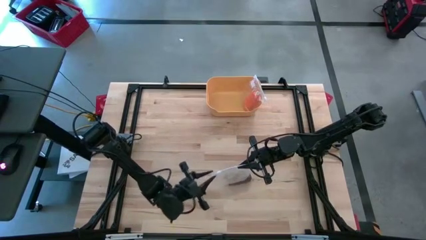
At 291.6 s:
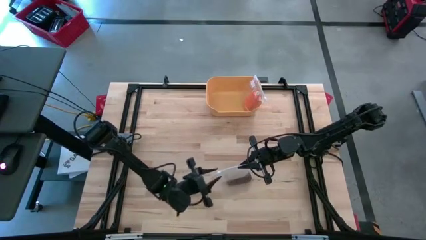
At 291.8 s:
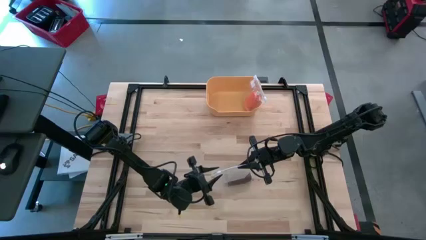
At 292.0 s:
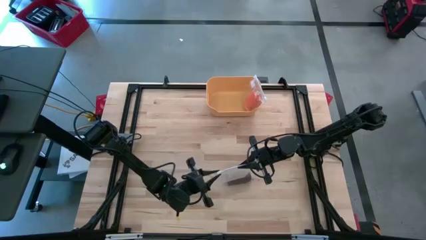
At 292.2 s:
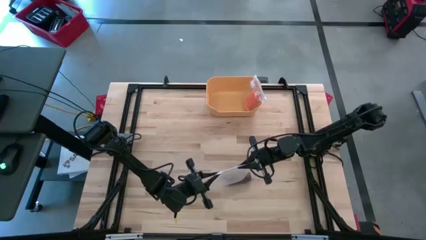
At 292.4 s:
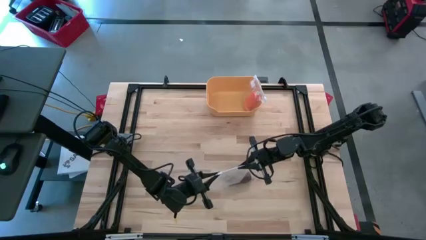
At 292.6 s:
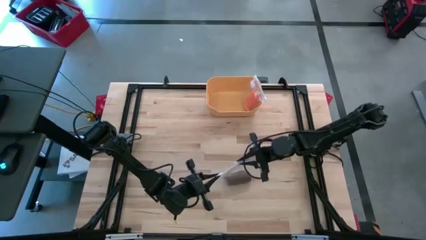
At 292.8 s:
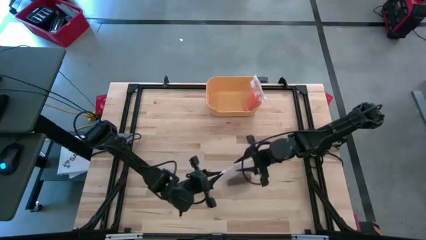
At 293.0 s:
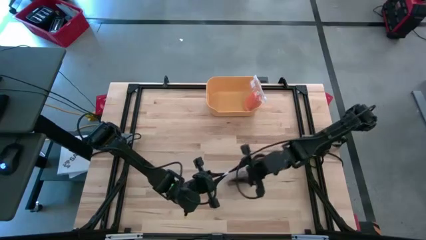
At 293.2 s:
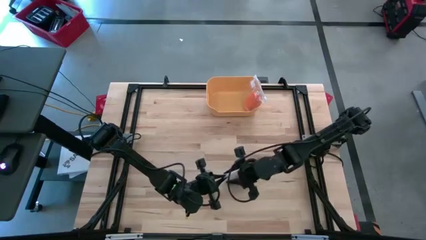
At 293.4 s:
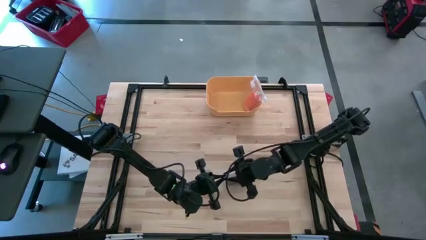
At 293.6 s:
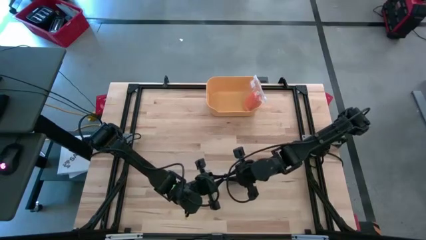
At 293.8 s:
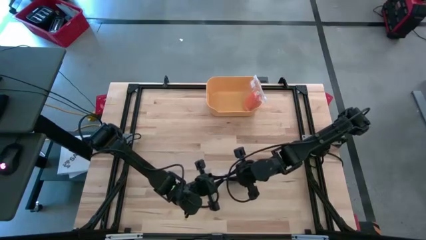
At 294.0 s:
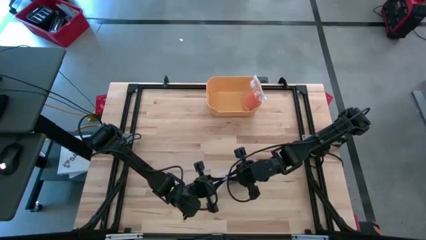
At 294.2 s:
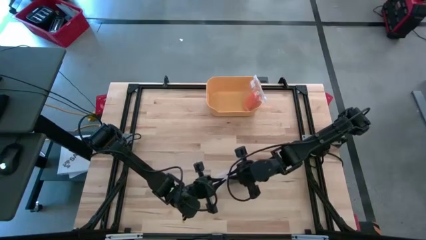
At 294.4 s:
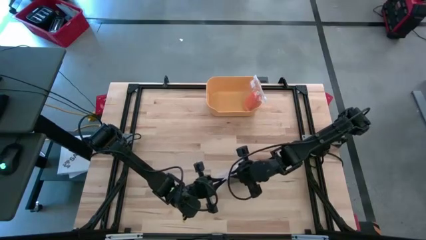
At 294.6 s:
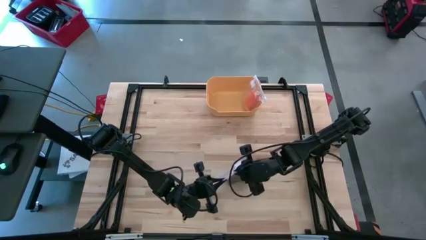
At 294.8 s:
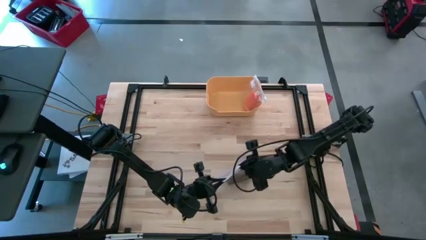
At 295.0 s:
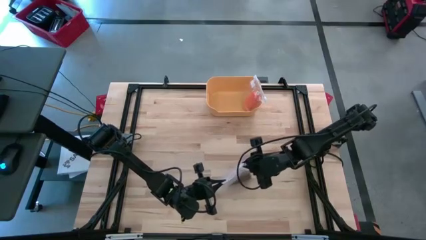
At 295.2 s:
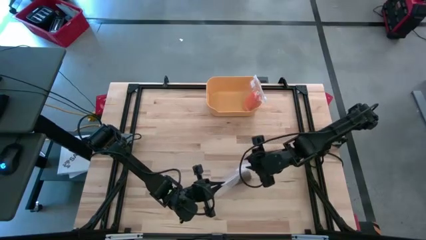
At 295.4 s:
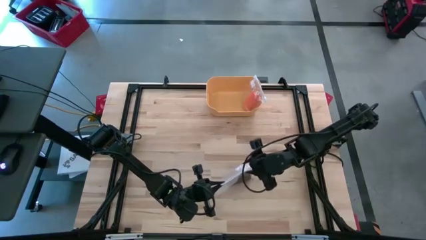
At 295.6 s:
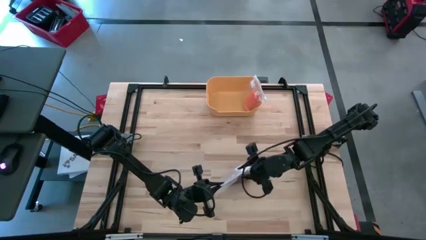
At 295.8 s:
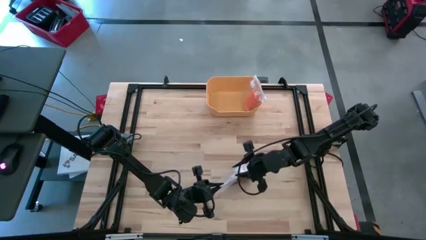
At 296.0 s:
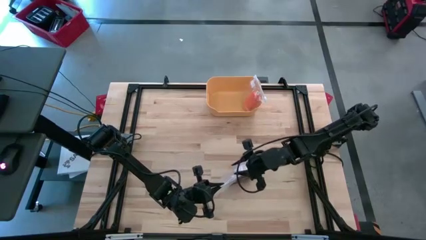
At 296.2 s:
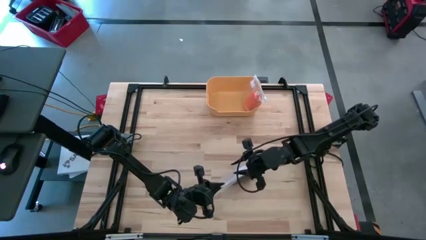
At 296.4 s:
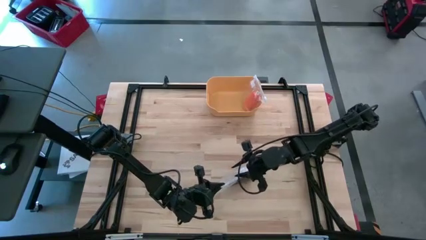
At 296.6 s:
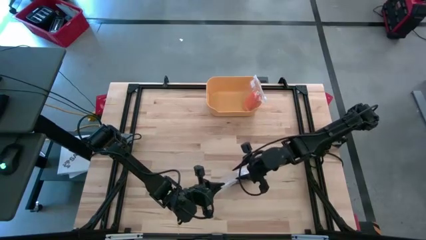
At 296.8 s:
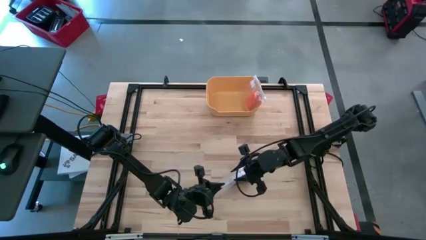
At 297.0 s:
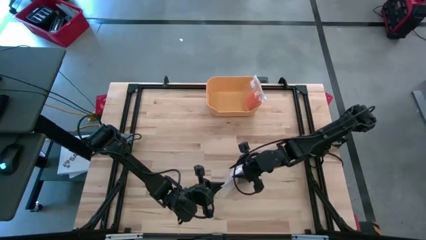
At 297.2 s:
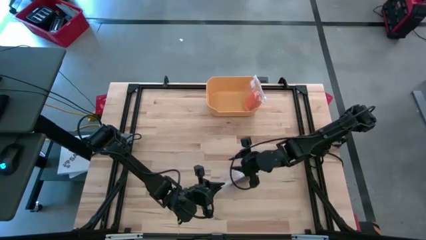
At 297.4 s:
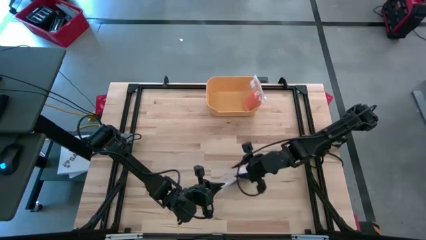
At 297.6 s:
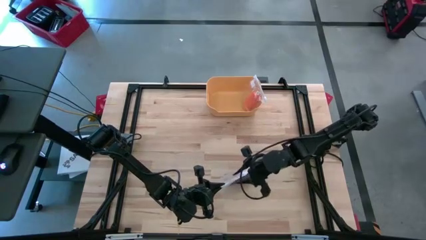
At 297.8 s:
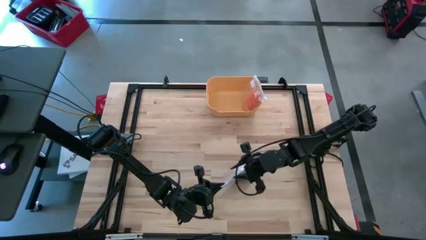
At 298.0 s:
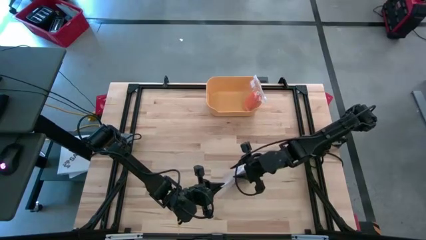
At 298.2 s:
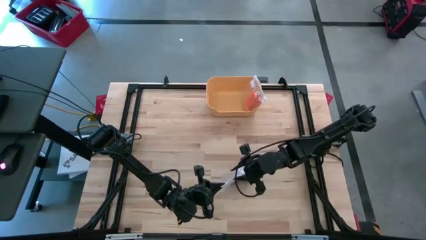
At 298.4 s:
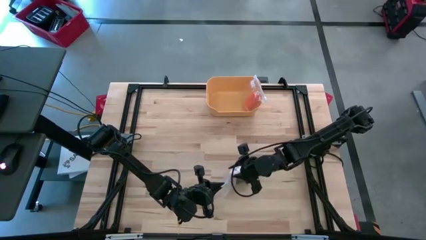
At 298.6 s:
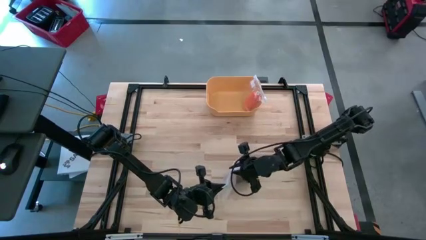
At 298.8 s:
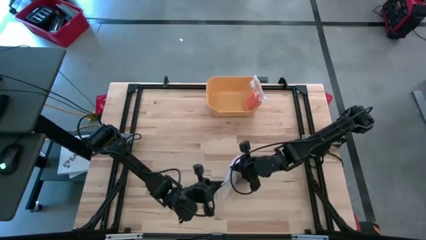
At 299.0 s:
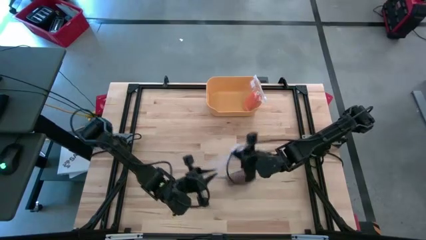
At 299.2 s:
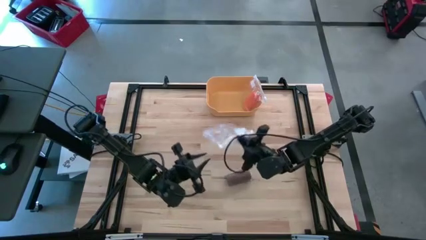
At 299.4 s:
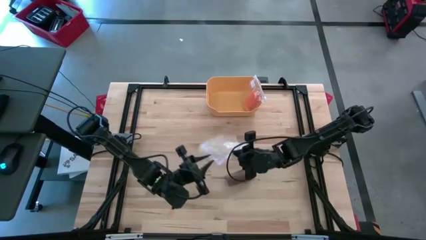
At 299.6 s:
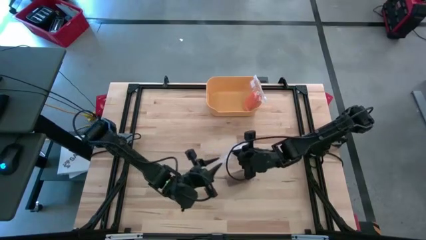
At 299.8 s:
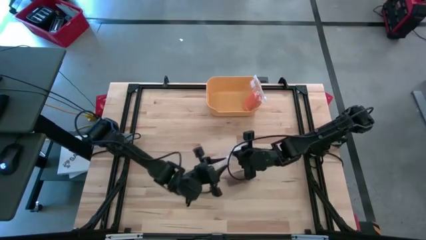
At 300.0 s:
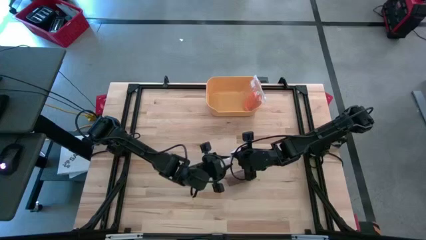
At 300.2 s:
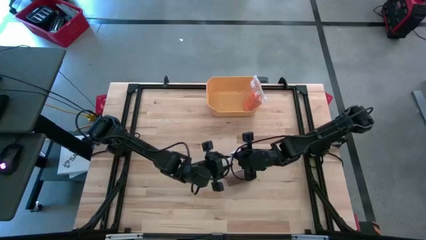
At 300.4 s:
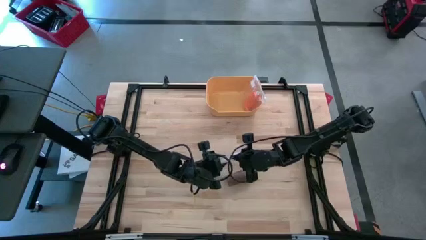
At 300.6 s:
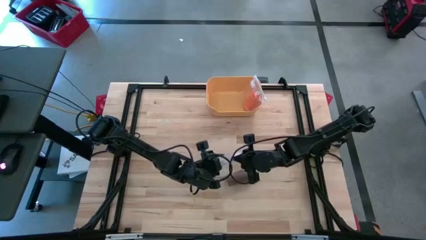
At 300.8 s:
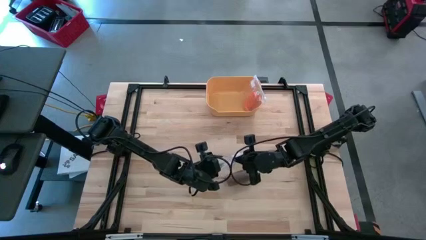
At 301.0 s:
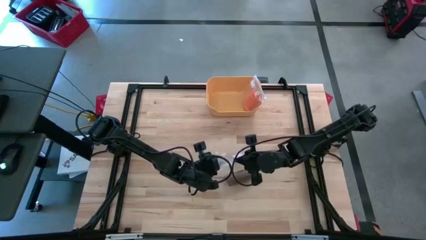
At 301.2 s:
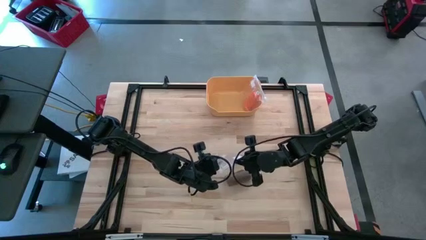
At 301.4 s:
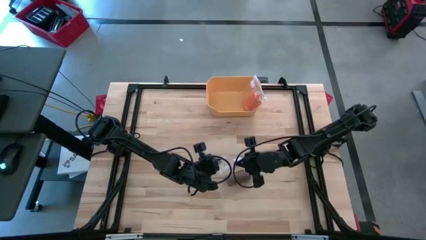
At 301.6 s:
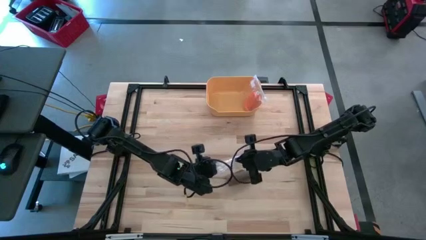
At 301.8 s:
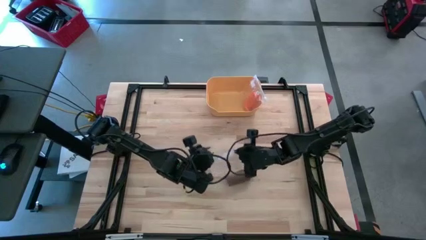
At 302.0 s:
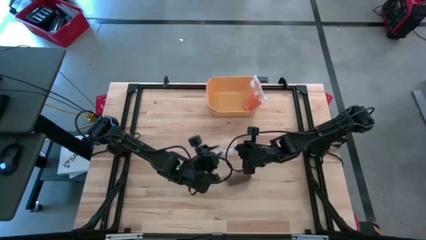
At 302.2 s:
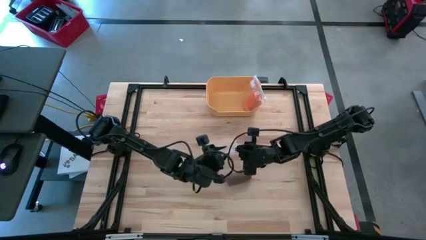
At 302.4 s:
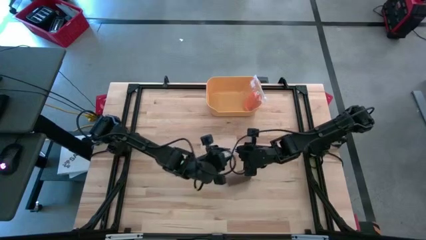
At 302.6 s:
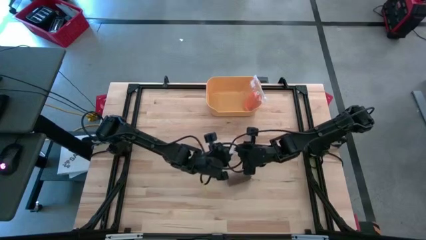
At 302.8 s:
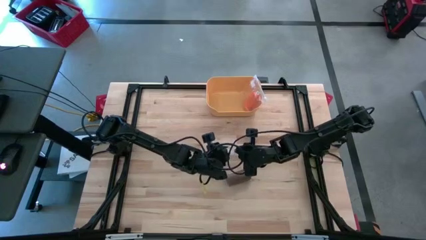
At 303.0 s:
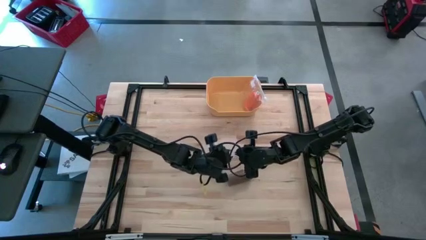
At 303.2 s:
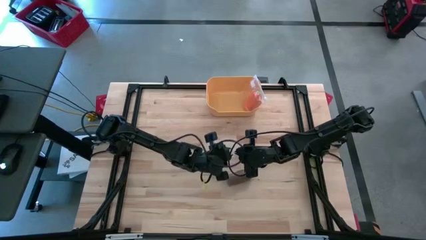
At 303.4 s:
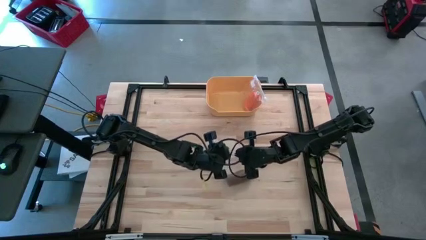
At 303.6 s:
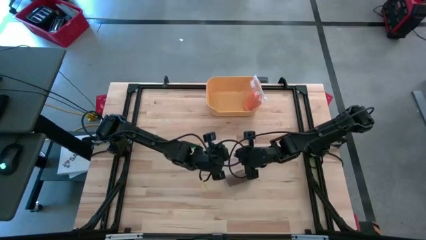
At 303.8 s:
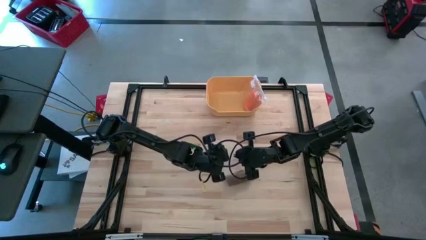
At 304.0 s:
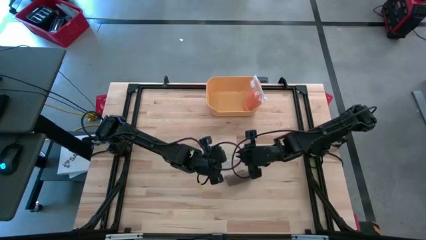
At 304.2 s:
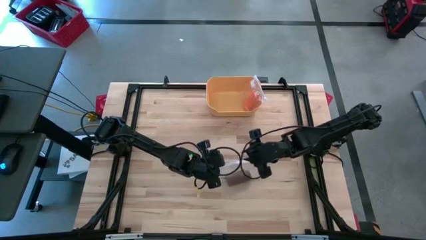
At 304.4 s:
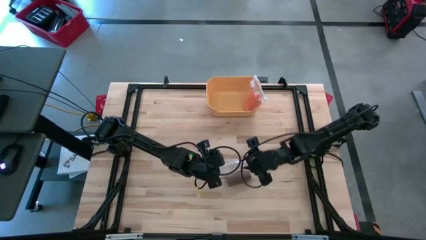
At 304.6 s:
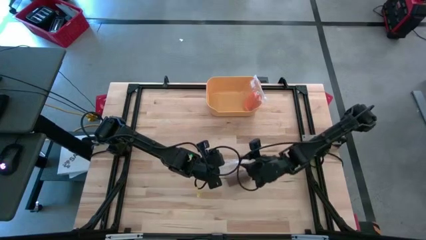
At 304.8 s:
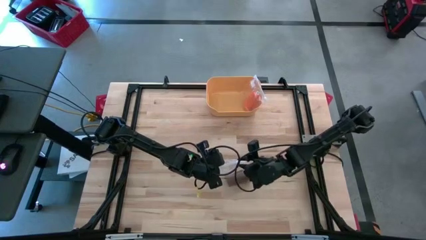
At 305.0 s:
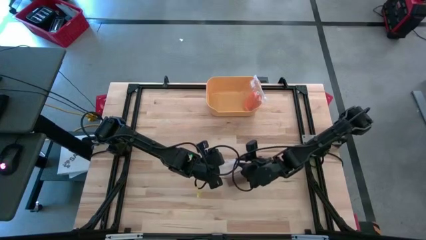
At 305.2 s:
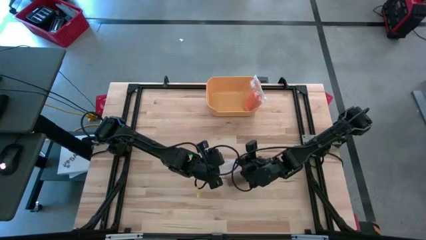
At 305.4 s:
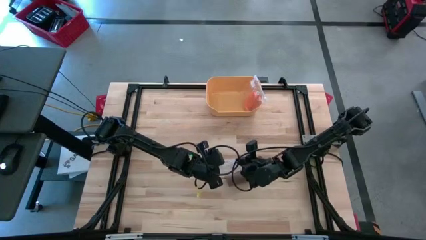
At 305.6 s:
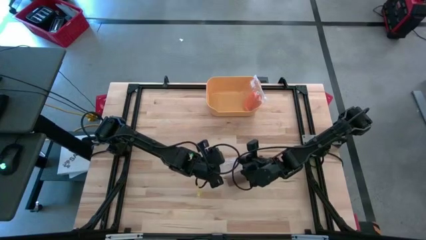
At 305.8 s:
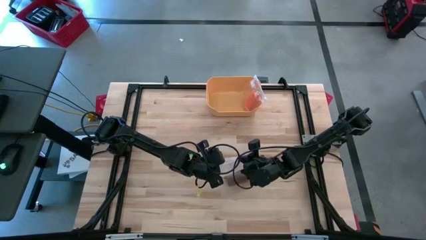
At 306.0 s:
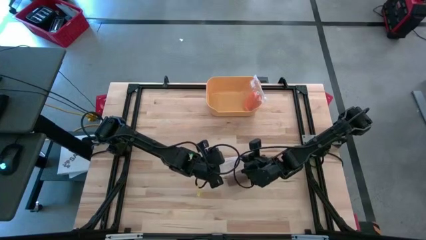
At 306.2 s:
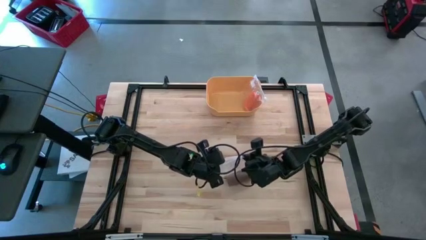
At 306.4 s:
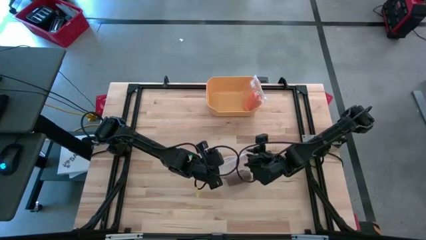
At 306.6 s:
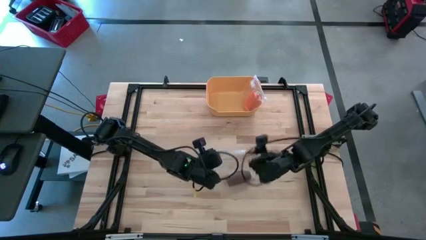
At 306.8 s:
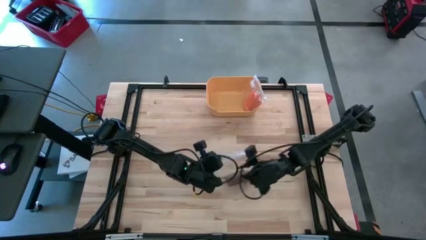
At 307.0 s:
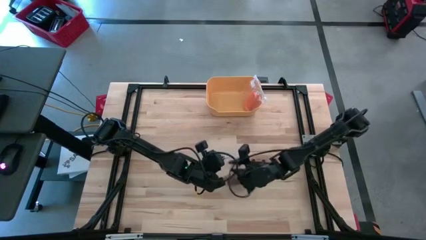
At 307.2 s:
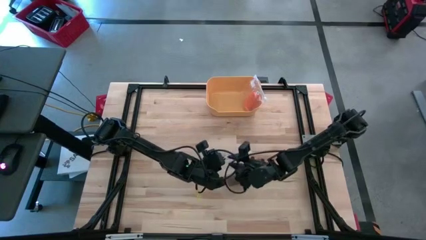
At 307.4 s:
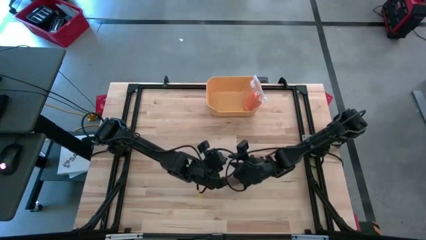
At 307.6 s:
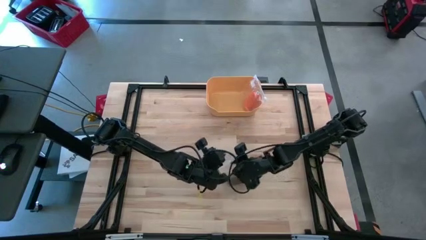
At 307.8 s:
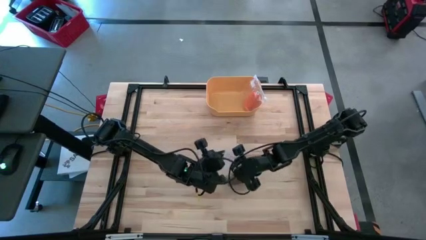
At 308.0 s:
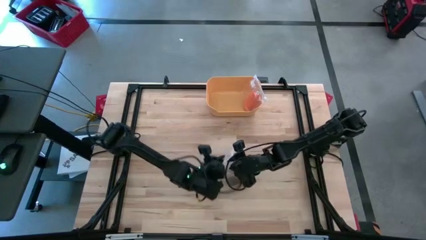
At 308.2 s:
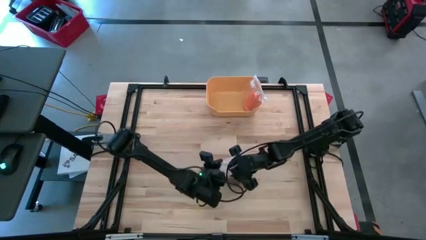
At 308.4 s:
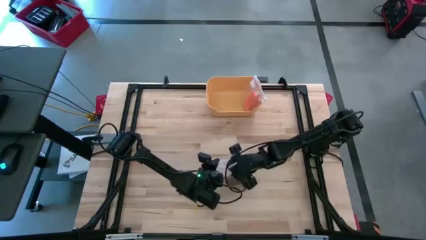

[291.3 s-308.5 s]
Task: Roll bandage
Open the transparent zip bag
